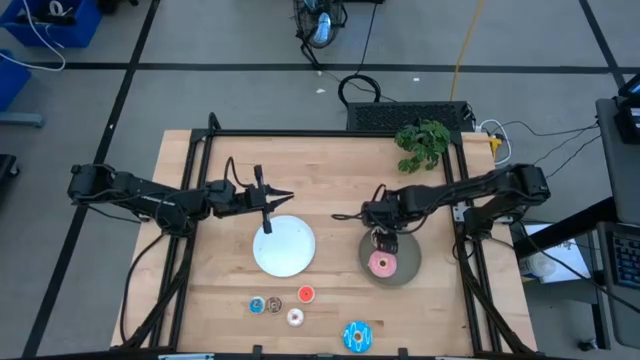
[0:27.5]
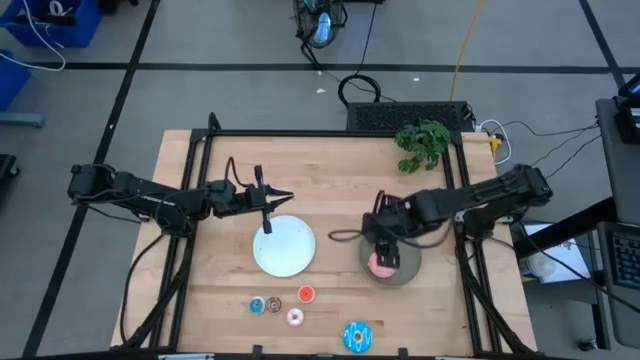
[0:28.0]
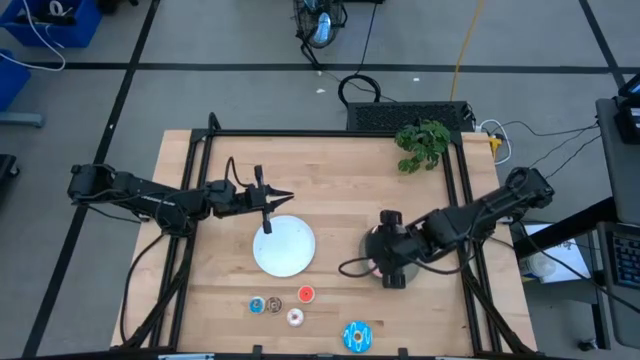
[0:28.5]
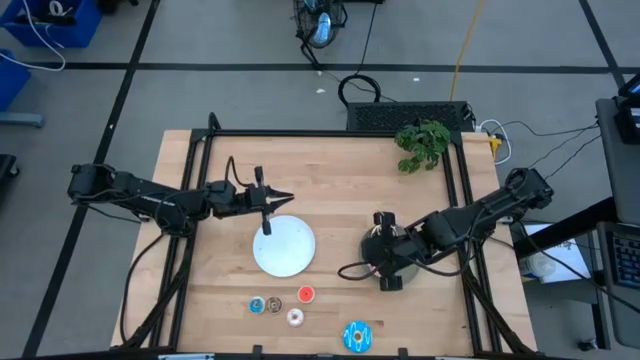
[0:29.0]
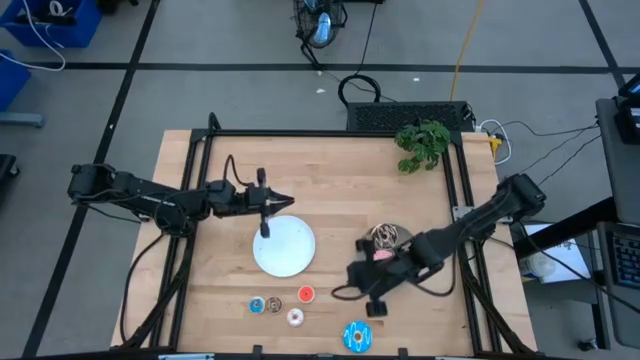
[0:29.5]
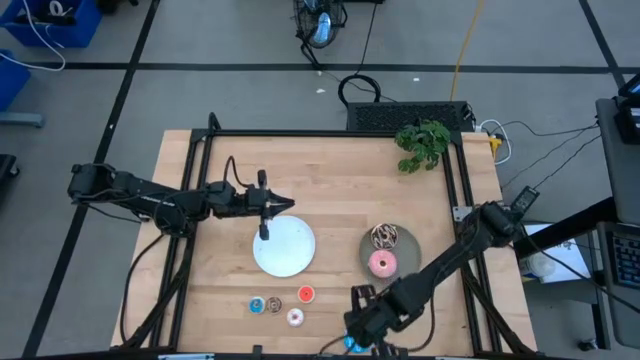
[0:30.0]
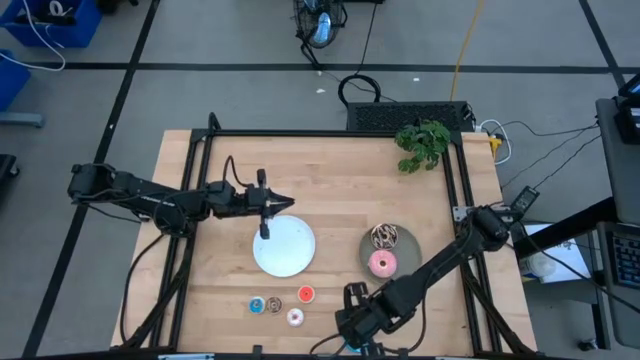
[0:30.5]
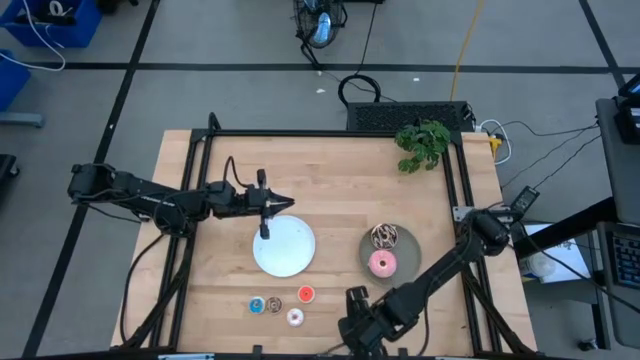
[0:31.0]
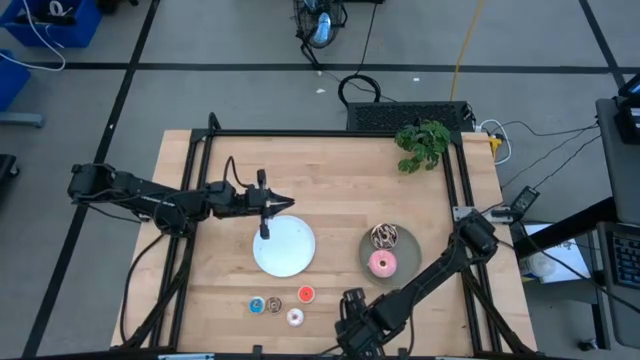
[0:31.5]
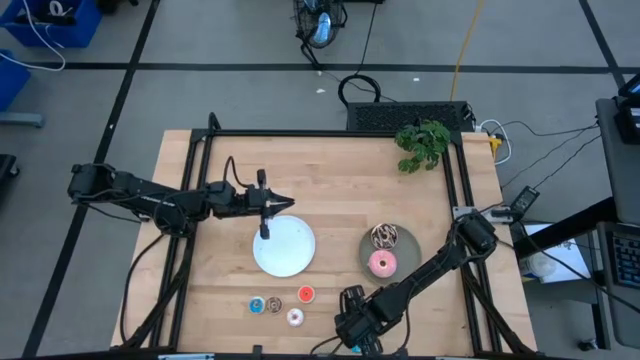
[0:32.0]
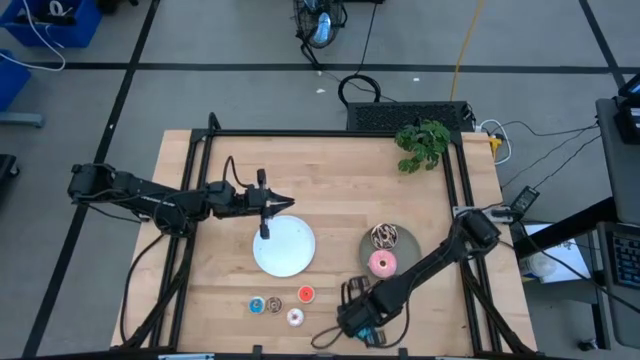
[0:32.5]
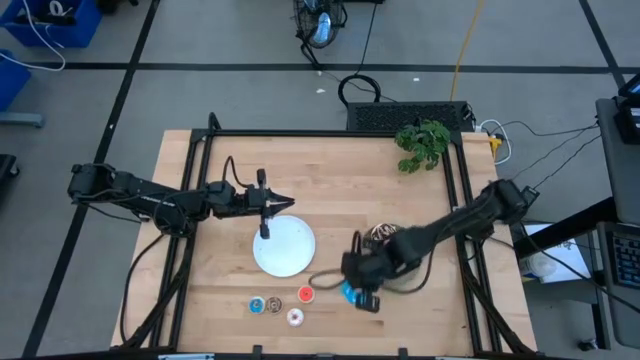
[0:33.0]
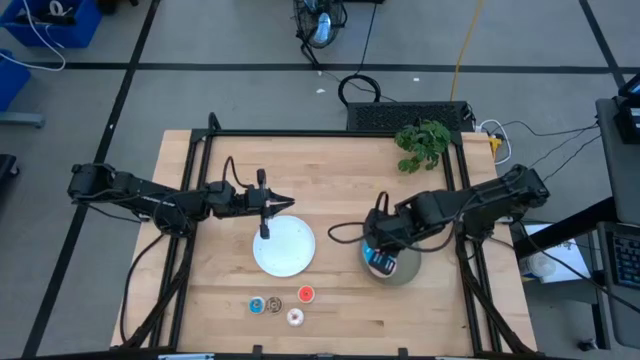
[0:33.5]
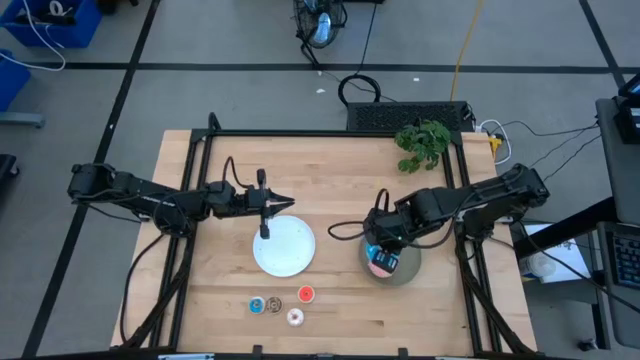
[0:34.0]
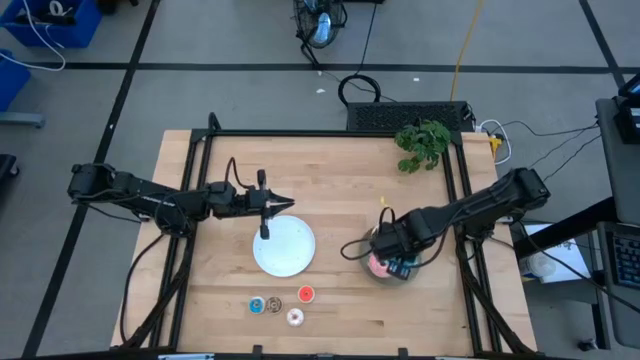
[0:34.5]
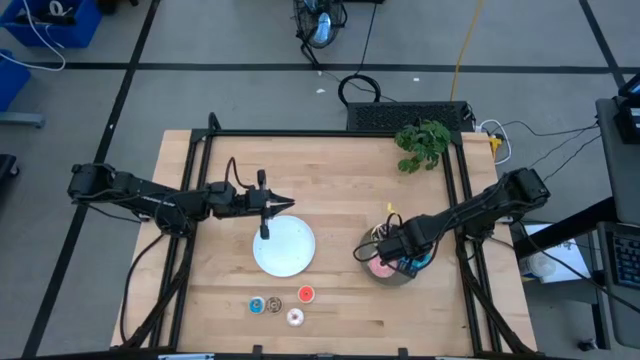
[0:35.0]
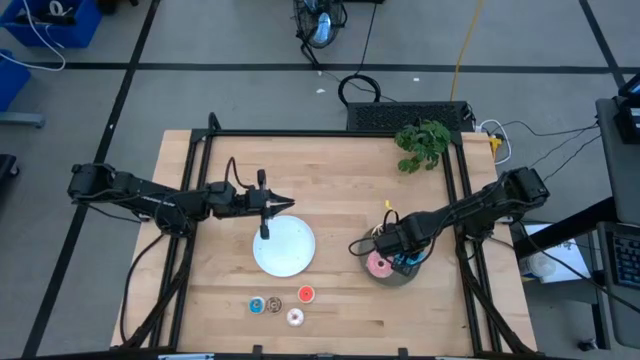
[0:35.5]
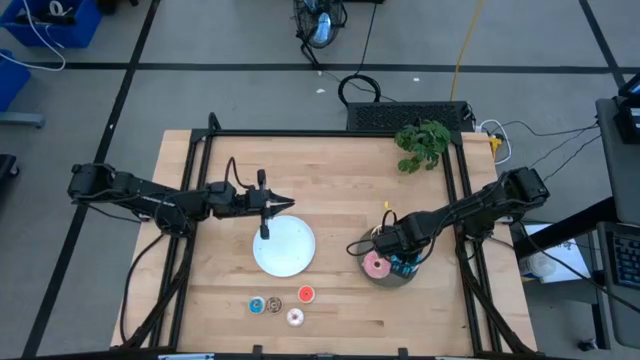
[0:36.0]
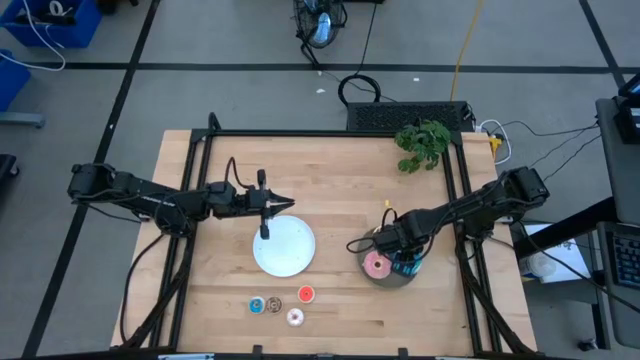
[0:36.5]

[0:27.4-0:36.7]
Task: Pick & Place donuts
Put the large blue donut on the gray plate

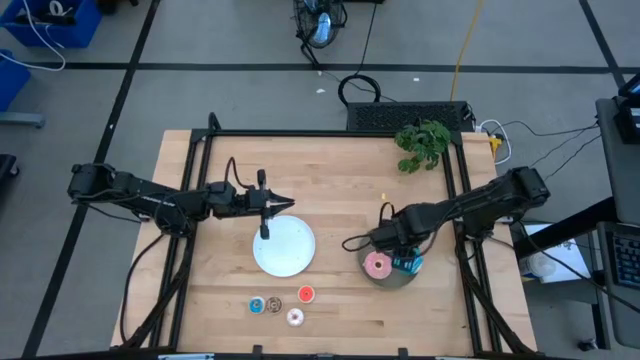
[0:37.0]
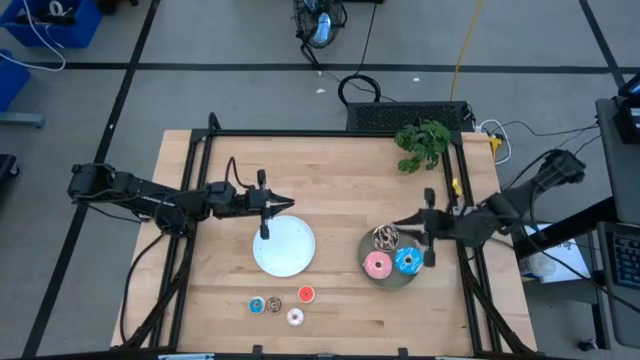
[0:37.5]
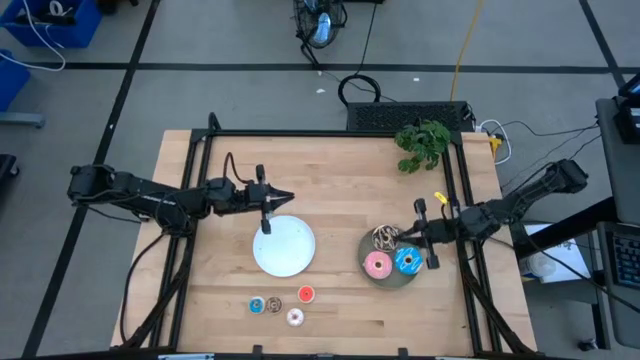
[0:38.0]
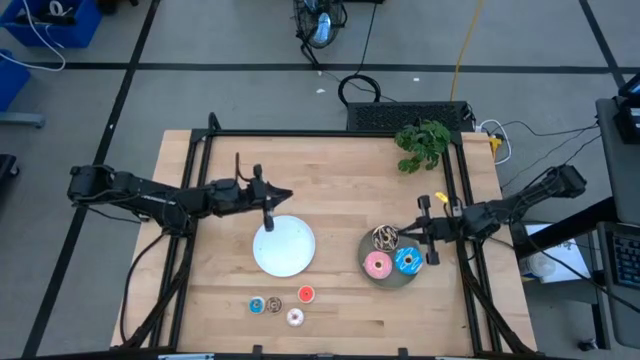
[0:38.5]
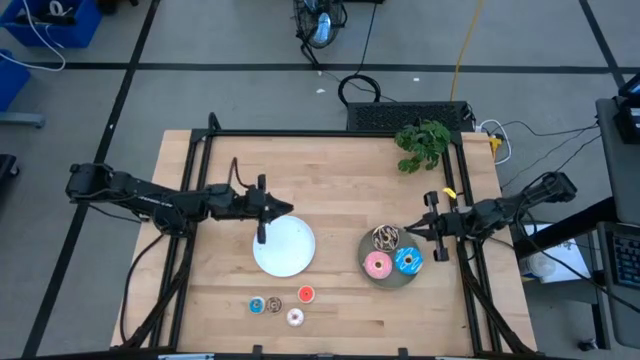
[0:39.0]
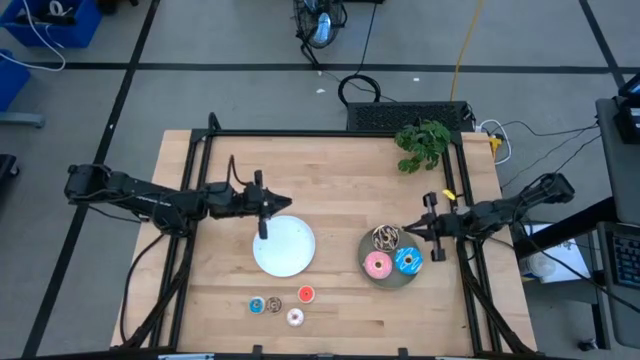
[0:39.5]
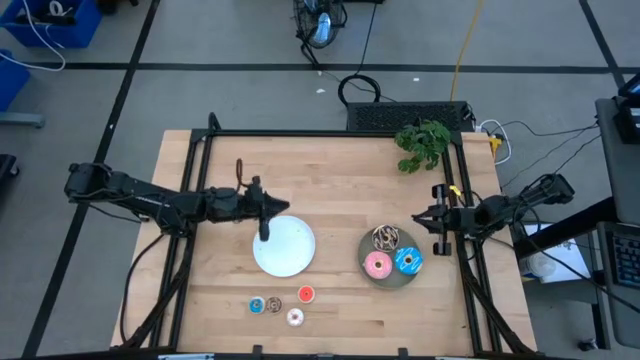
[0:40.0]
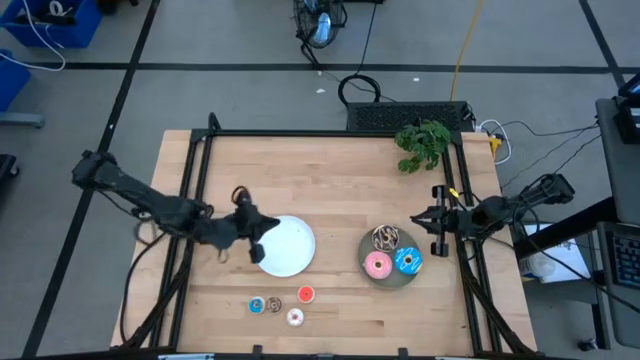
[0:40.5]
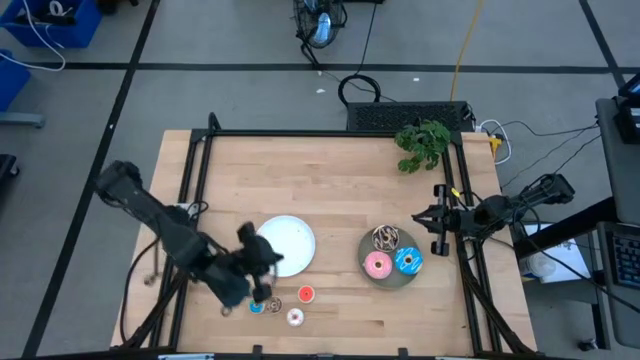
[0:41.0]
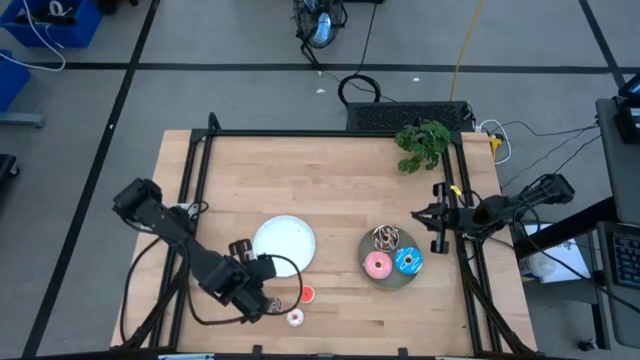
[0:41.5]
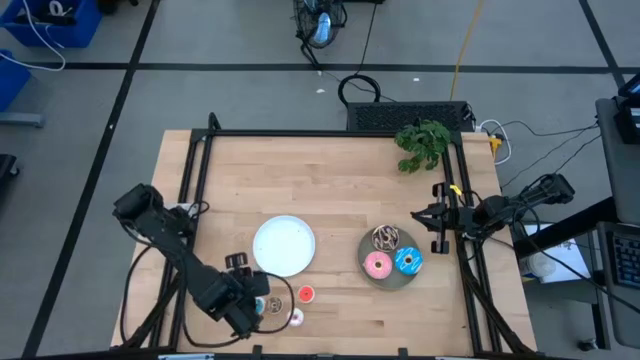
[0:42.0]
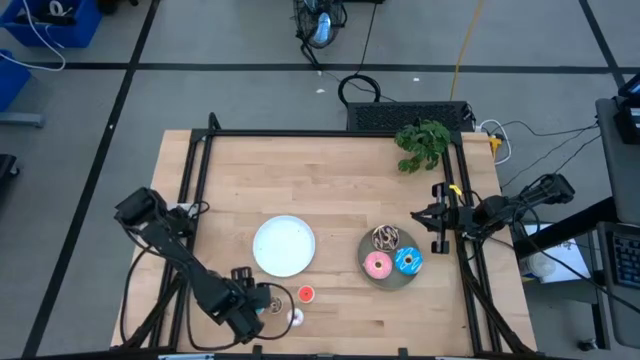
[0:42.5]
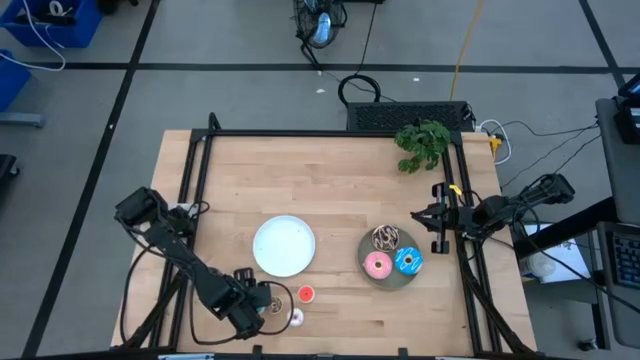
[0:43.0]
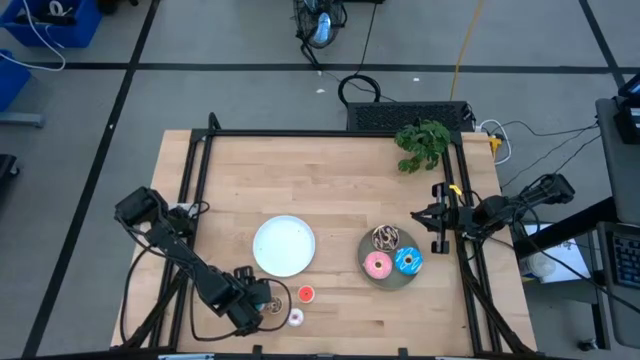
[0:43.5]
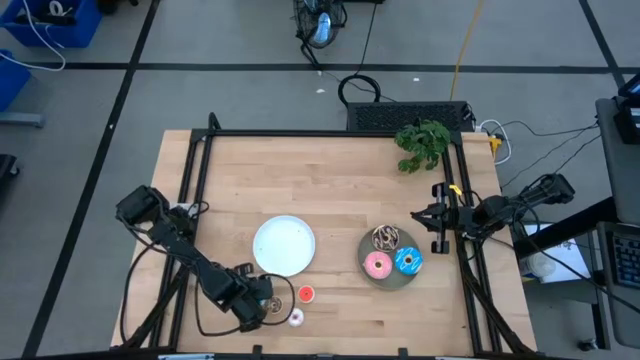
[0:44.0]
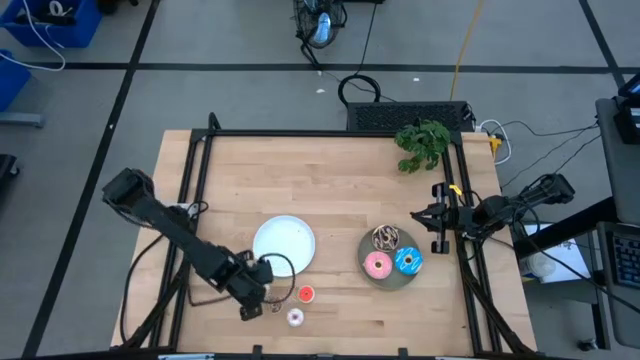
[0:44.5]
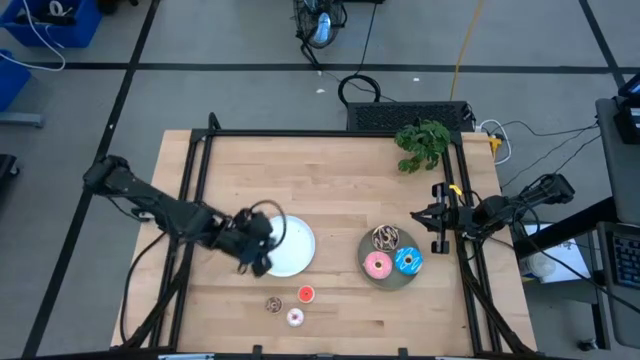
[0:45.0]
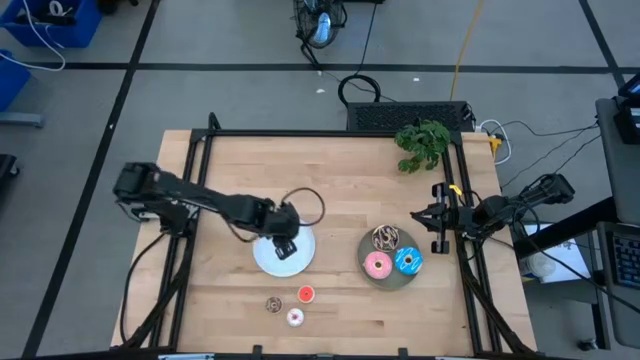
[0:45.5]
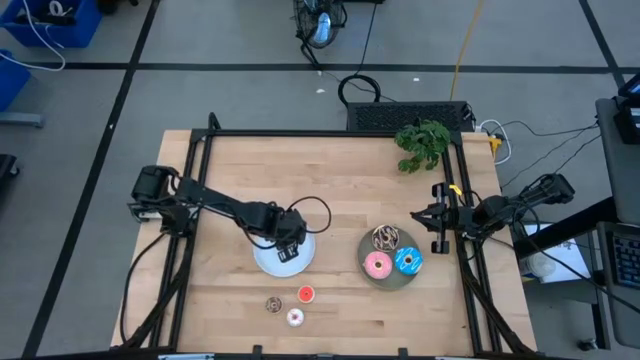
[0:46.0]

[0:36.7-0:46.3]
Put the small blue donut on the white plate

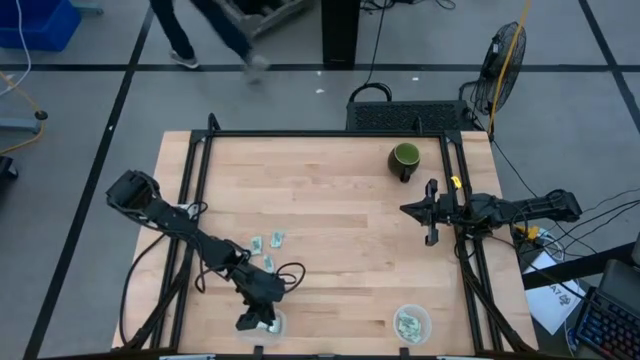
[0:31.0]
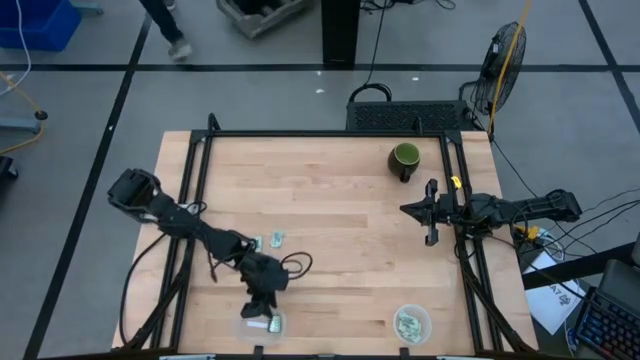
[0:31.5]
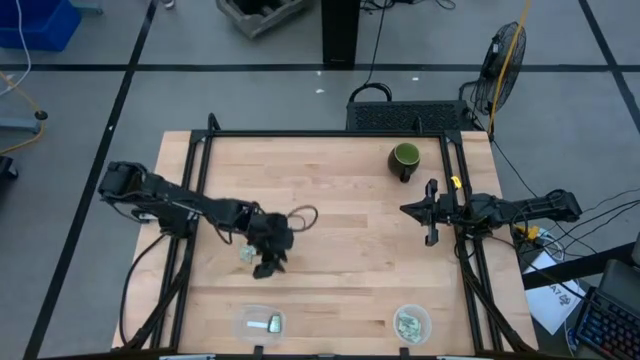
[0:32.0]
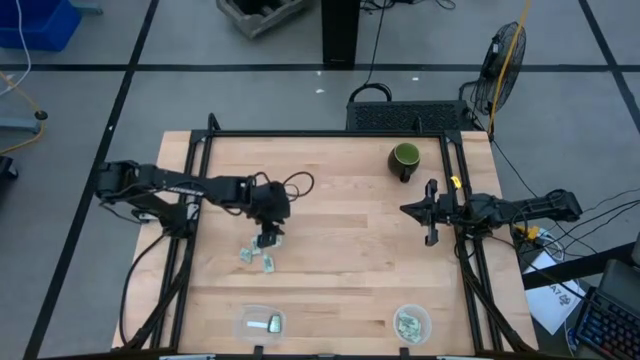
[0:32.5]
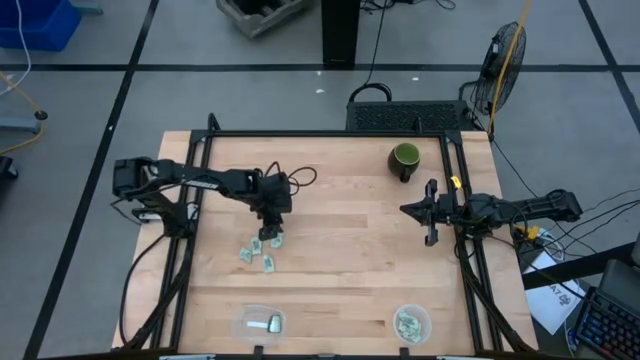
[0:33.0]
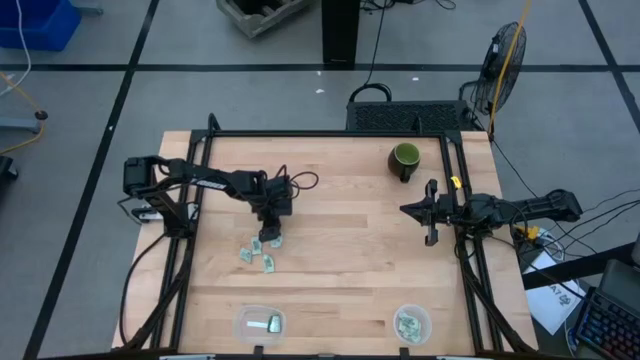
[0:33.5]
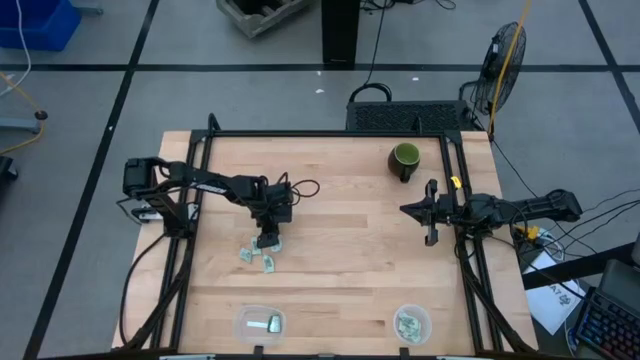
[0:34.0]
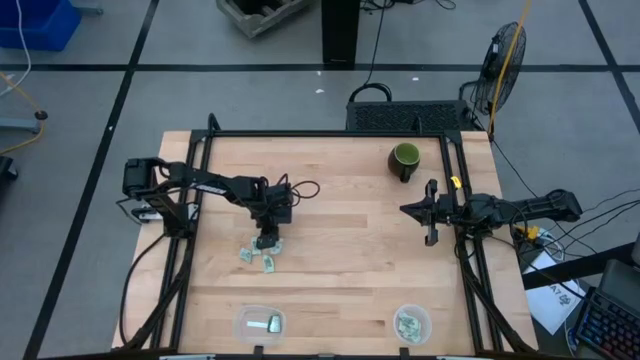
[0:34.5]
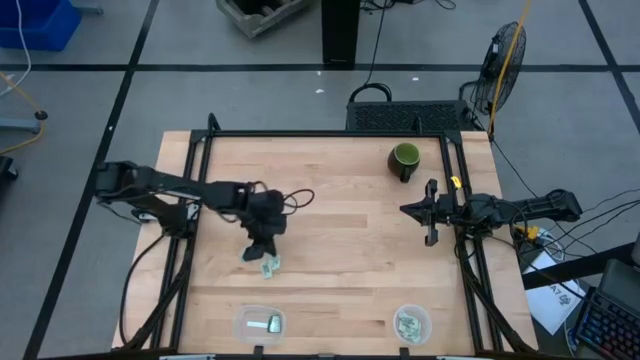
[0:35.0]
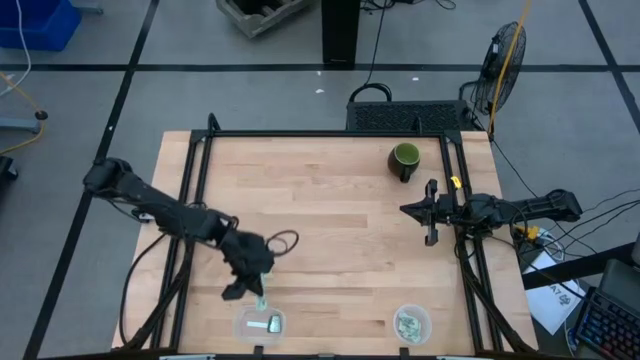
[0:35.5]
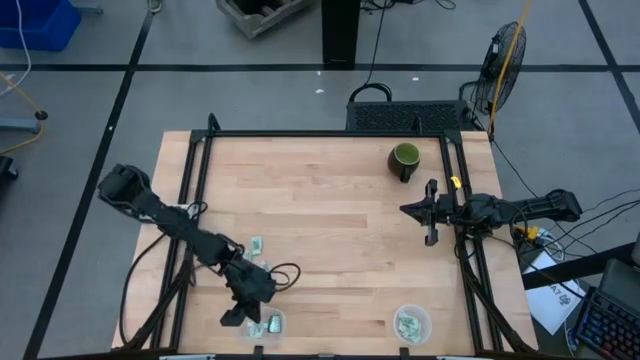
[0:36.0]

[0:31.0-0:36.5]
Task: Pick and place Stevia / Truvia into bins
Put the stevia packet into the left transparent container
